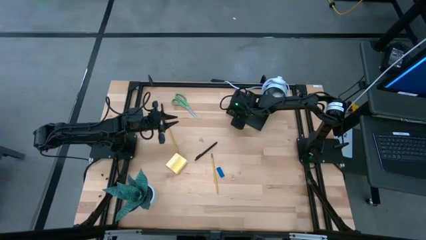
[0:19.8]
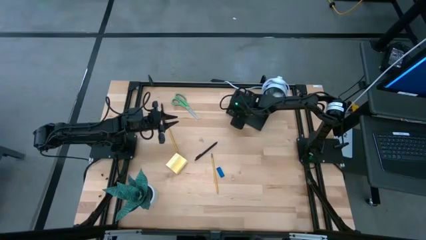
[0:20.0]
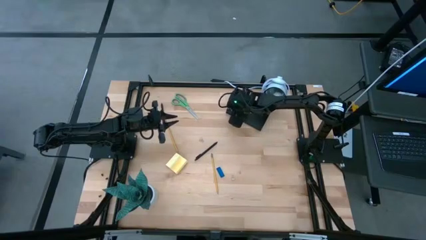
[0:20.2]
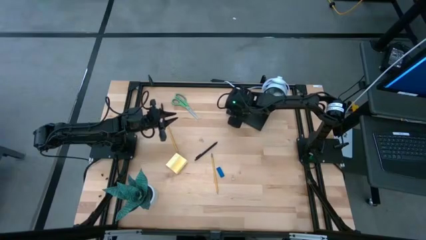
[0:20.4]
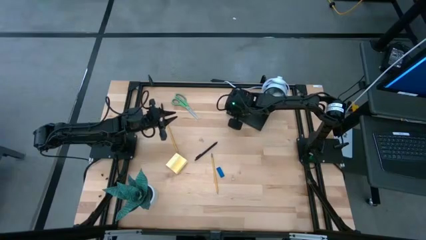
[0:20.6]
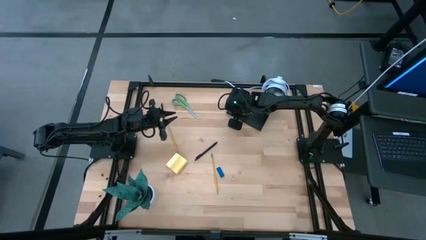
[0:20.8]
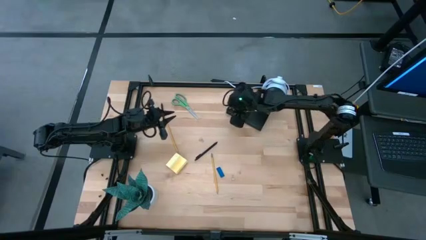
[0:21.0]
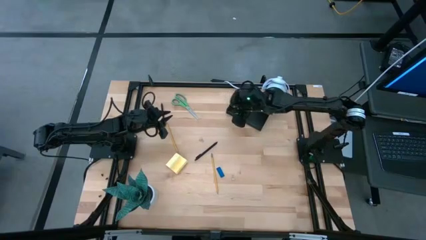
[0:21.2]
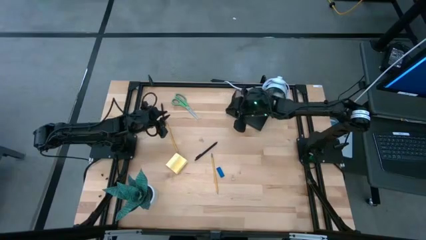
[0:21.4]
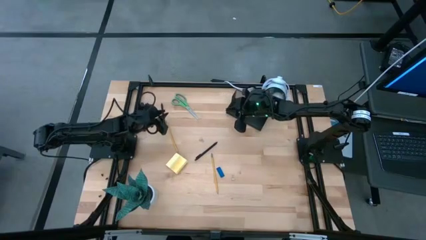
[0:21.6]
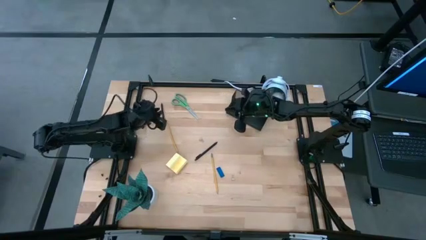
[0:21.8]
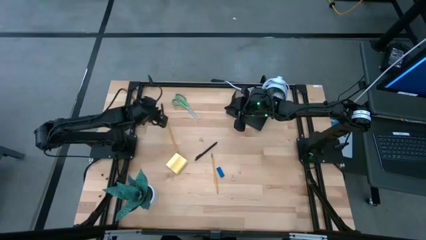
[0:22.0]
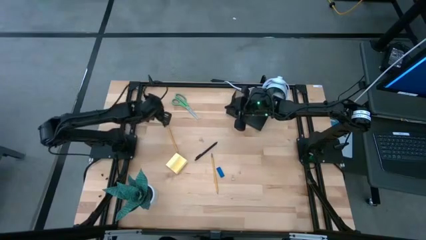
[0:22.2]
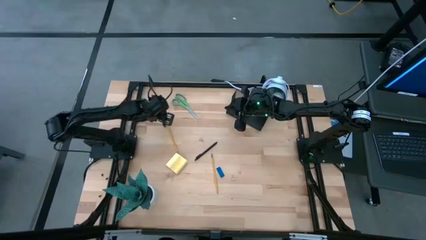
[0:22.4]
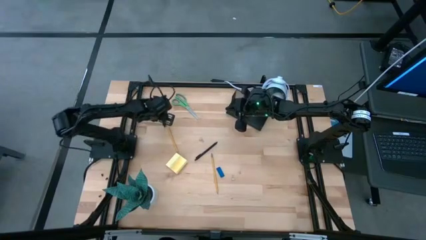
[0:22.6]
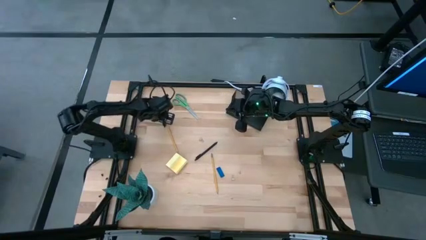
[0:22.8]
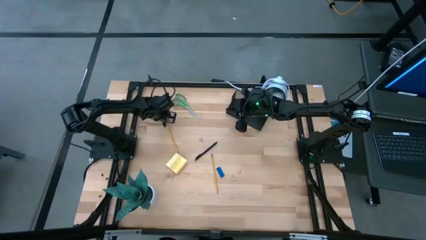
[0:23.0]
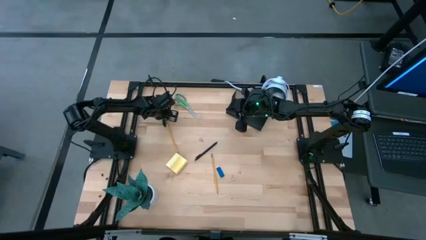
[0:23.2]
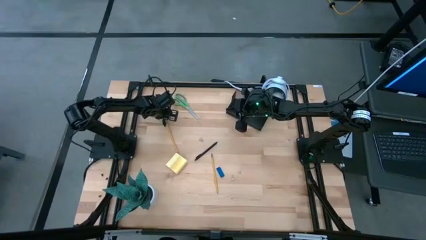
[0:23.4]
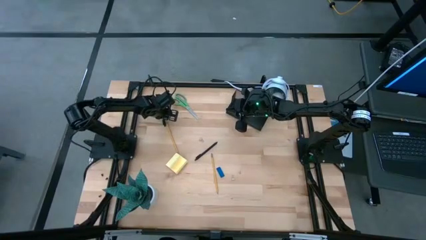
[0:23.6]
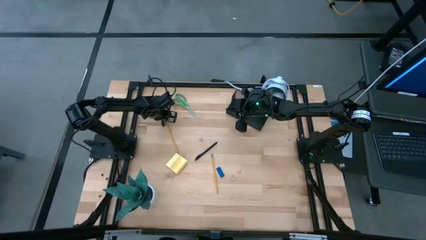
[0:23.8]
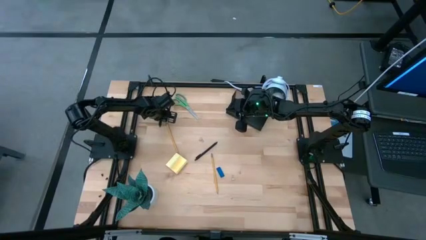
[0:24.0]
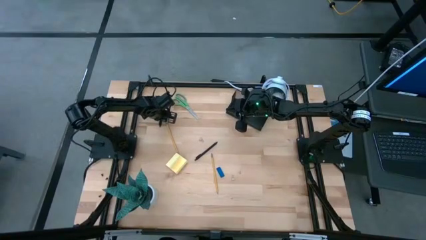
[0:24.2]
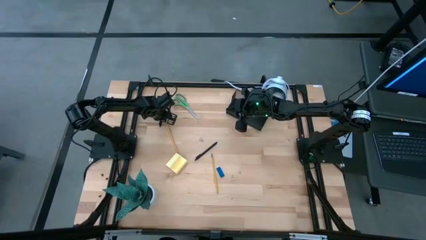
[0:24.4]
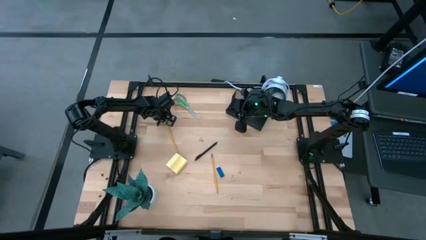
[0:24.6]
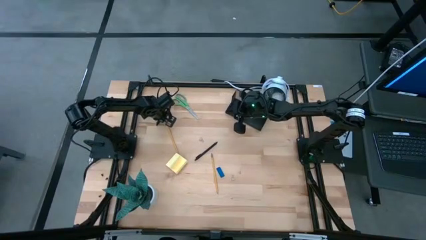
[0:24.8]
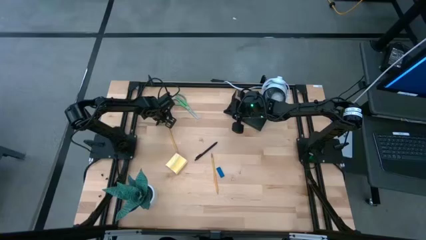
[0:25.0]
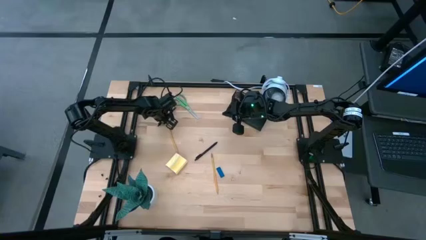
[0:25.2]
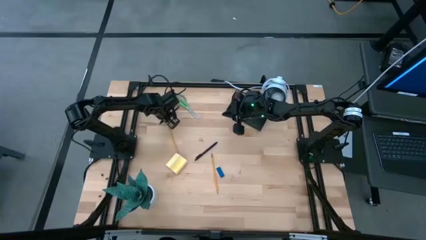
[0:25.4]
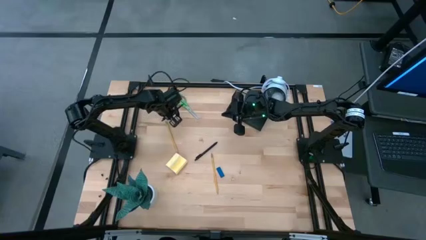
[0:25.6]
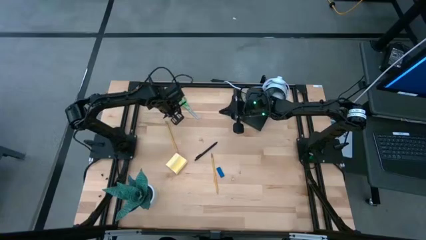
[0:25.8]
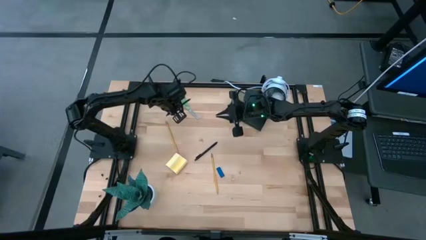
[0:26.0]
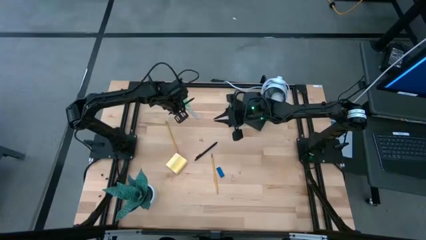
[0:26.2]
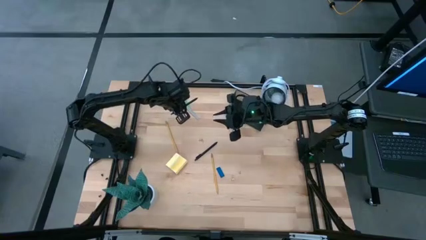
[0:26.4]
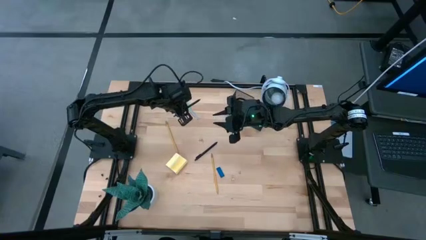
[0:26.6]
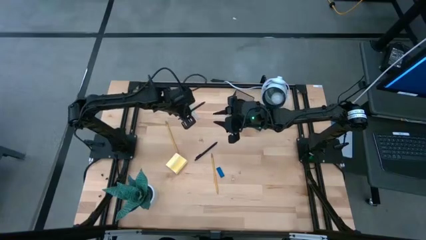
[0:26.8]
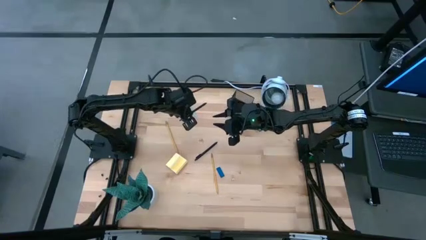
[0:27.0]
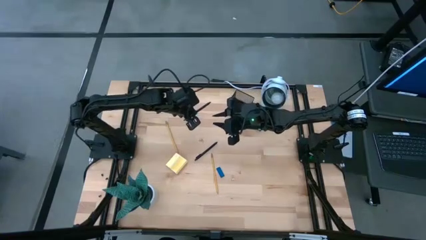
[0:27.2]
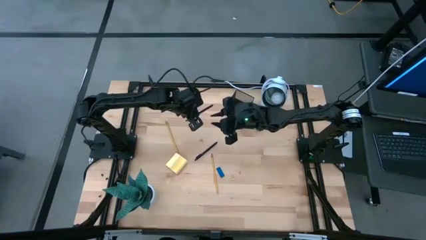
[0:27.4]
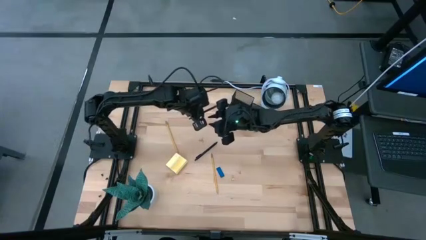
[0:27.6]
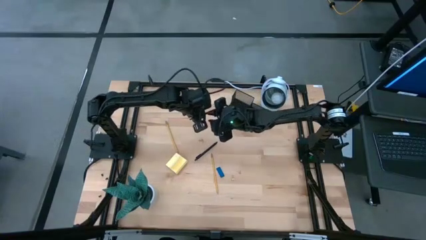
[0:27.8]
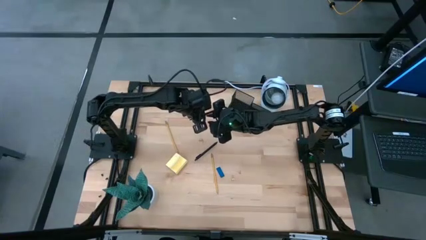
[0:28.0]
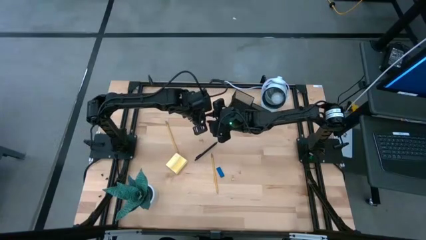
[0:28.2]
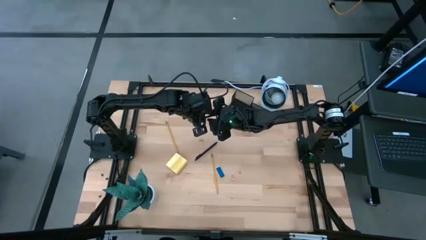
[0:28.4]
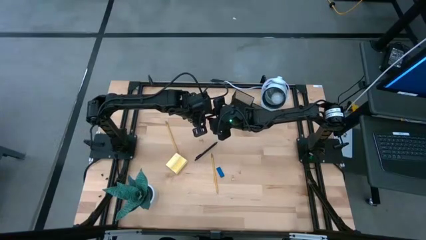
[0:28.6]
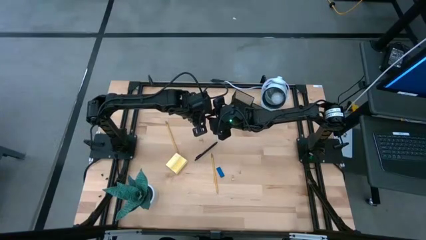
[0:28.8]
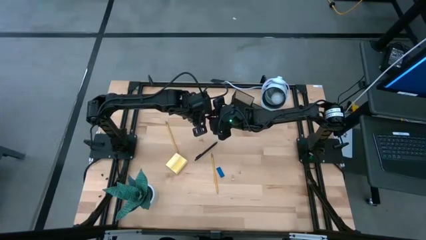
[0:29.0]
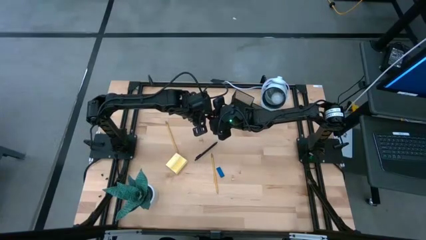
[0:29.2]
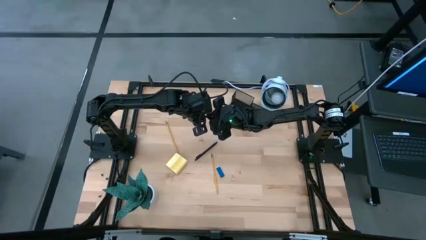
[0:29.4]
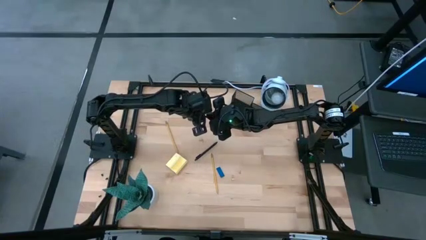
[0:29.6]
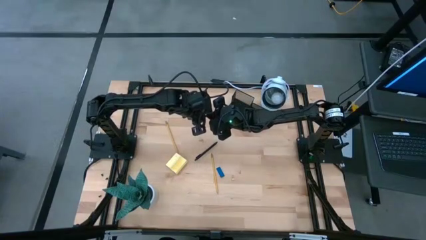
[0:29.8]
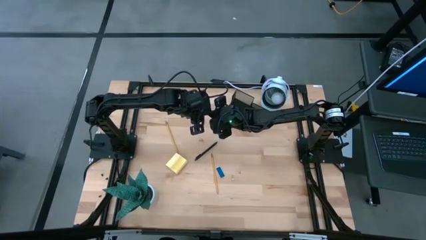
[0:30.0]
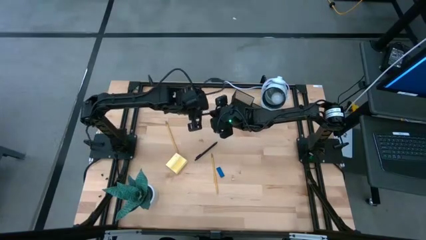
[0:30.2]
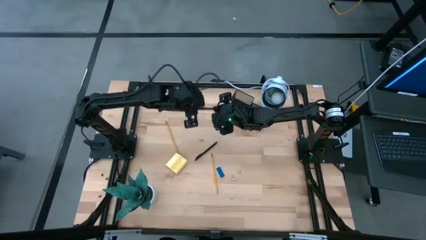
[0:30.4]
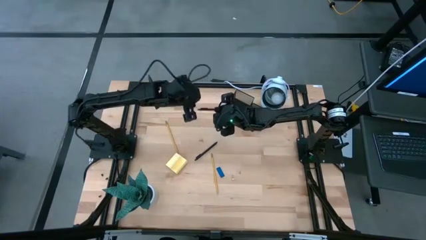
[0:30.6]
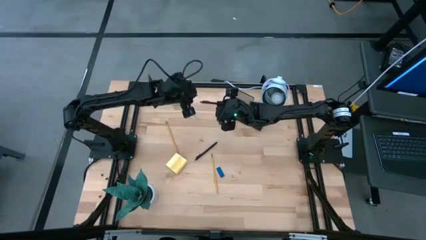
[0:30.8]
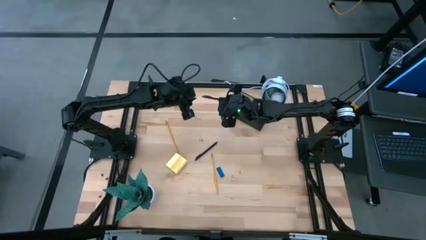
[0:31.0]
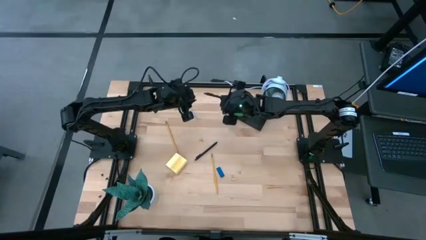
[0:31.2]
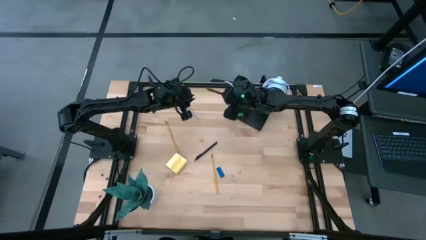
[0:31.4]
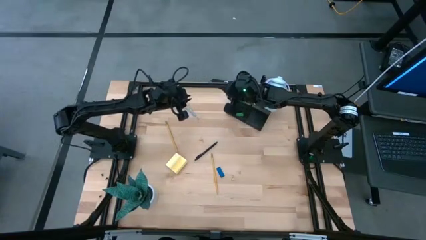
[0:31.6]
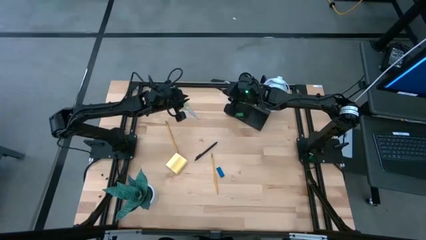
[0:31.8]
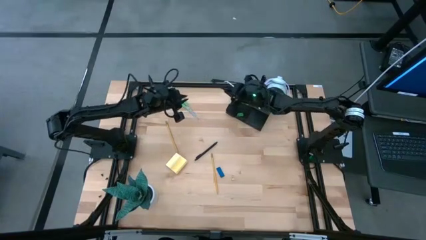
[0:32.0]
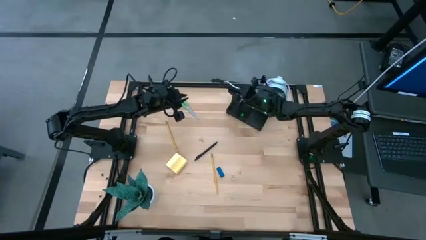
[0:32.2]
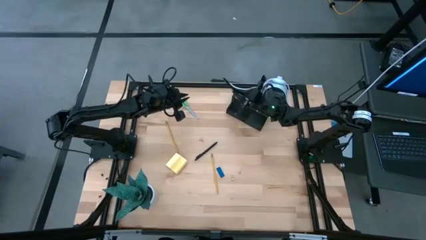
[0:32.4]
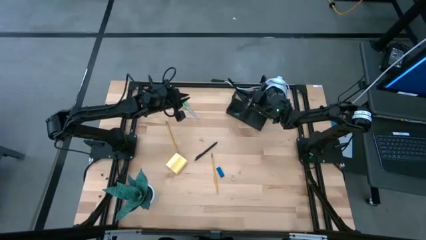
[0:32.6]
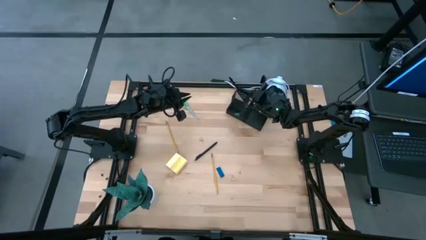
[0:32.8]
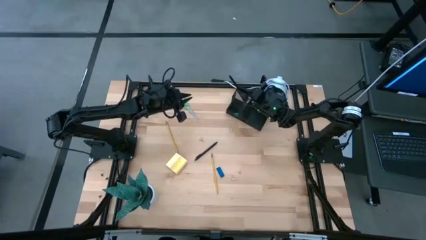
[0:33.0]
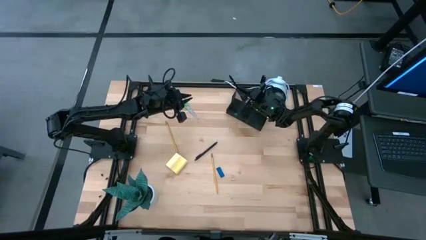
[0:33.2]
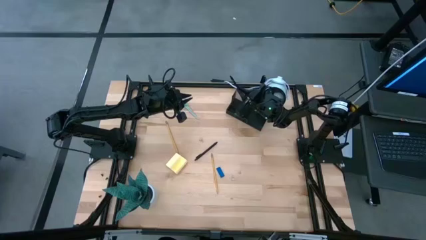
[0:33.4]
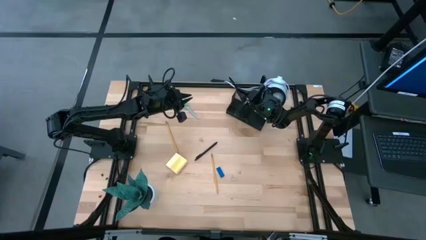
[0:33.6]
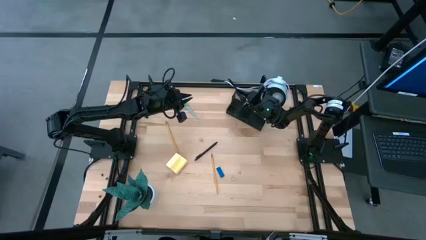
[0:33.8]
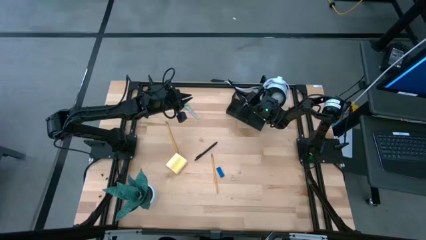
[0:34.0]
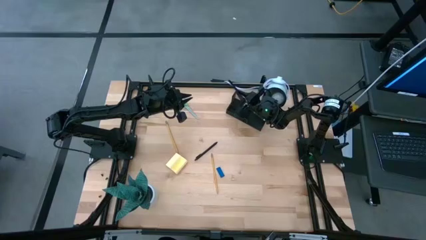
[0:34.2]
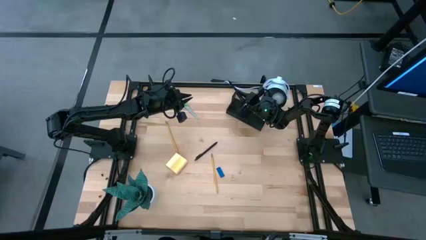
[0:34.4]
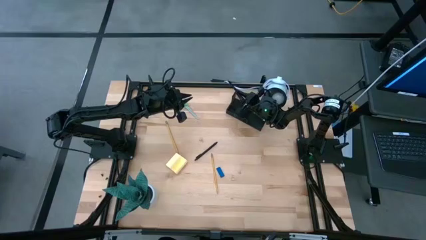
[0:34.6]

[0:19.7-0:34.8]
Task: Pick and place office supplies into organizer
Put the top black pen into the metal mesh desk organizer
